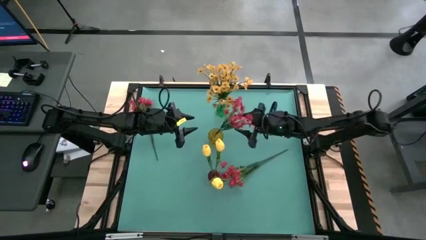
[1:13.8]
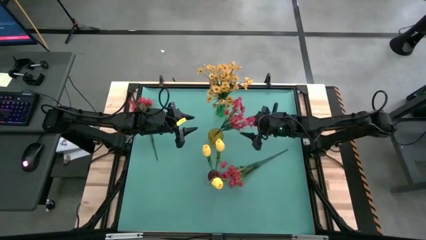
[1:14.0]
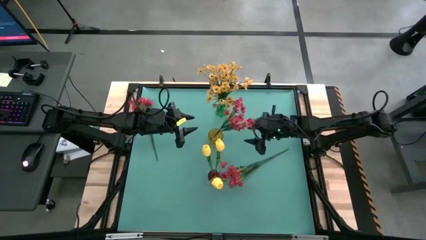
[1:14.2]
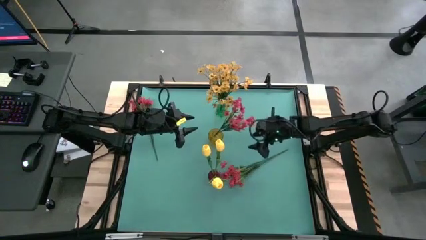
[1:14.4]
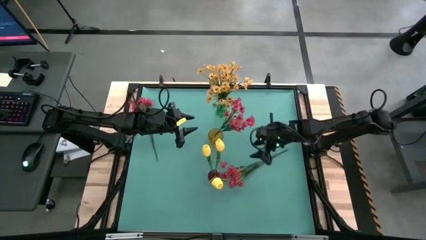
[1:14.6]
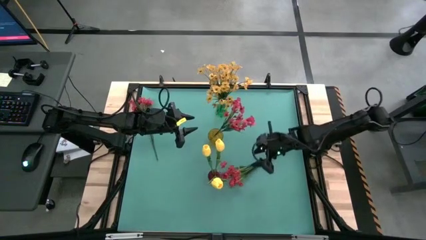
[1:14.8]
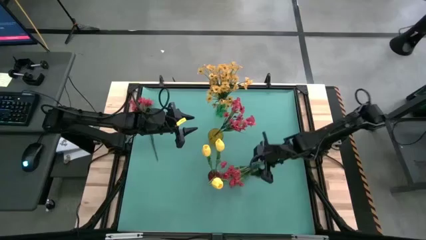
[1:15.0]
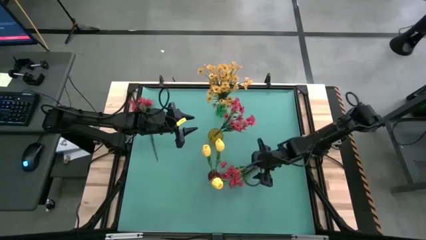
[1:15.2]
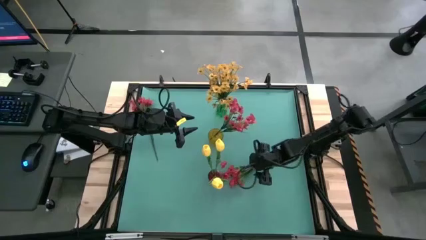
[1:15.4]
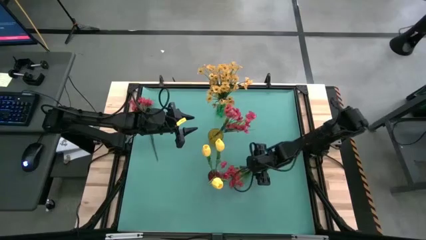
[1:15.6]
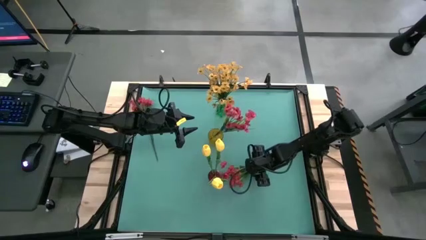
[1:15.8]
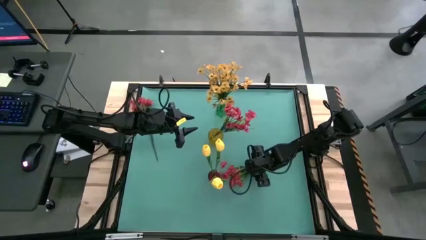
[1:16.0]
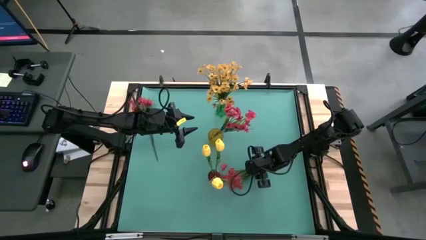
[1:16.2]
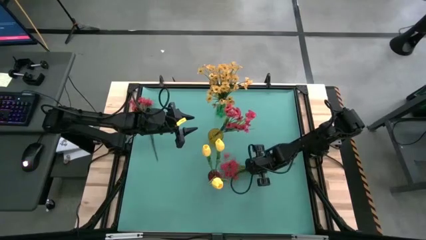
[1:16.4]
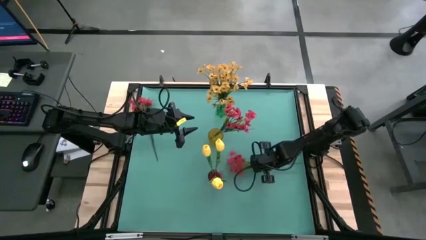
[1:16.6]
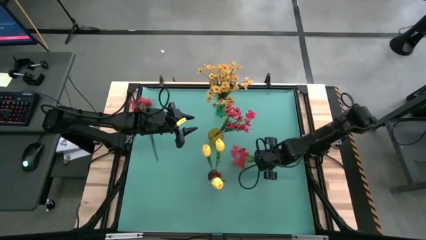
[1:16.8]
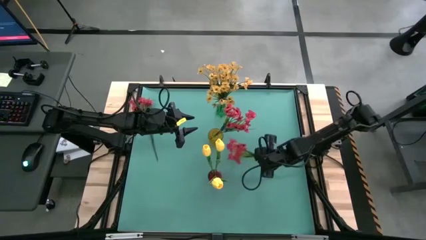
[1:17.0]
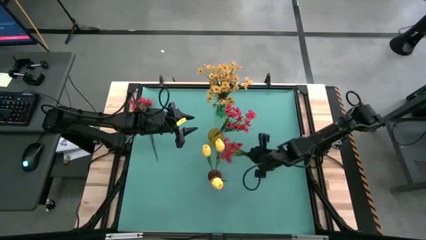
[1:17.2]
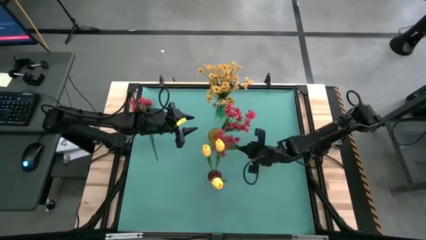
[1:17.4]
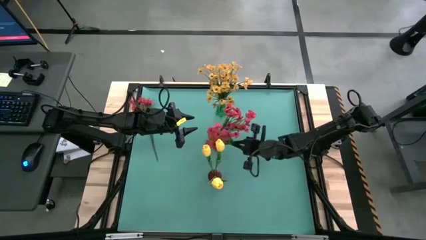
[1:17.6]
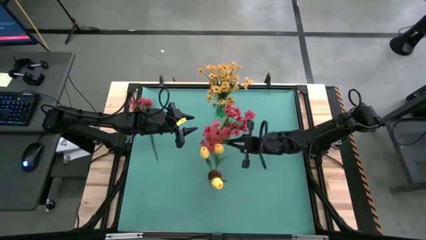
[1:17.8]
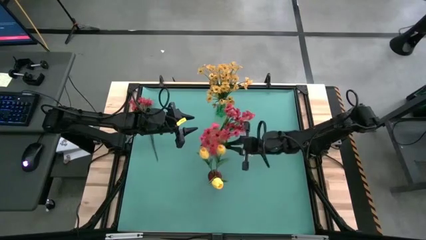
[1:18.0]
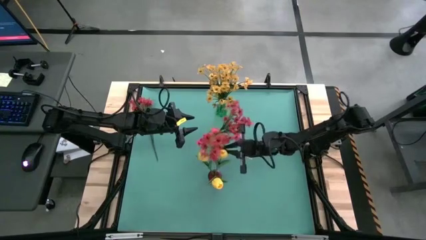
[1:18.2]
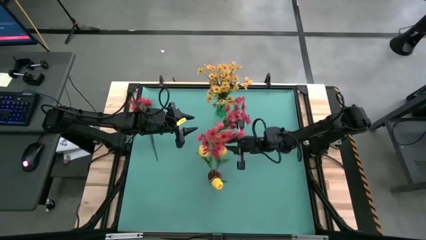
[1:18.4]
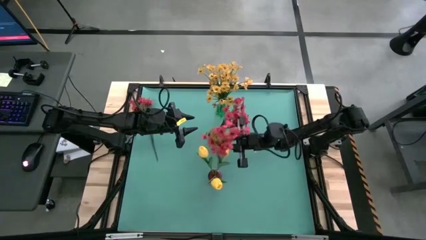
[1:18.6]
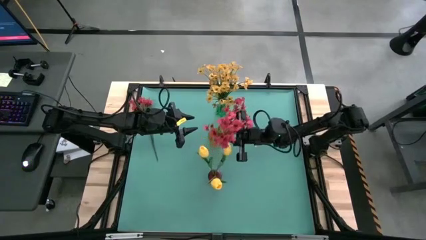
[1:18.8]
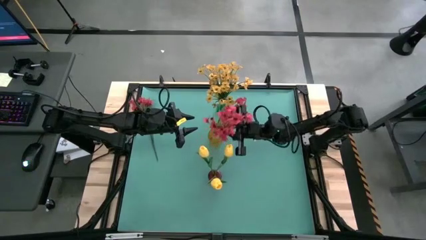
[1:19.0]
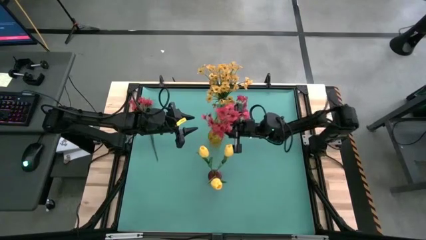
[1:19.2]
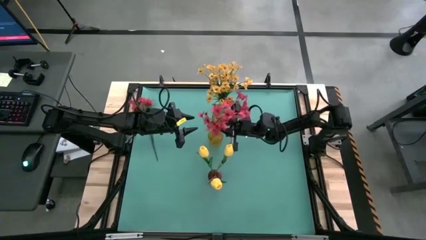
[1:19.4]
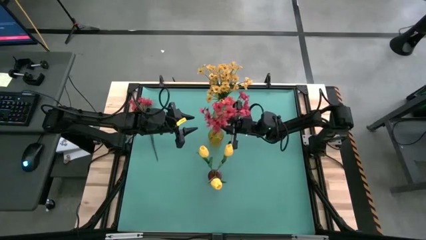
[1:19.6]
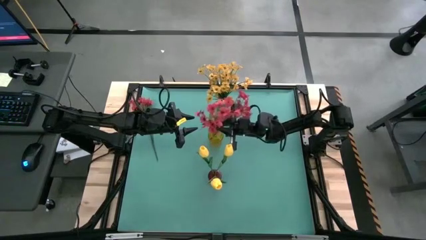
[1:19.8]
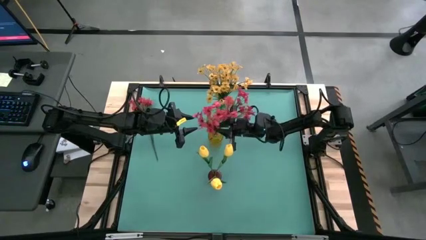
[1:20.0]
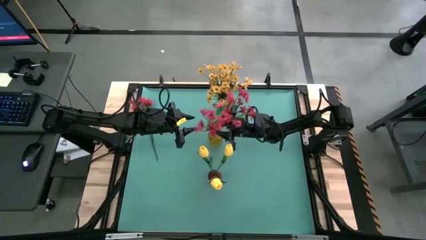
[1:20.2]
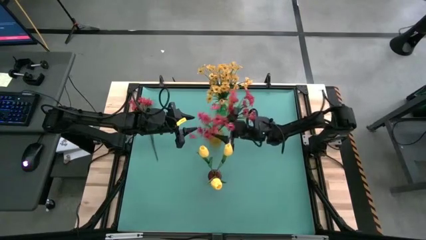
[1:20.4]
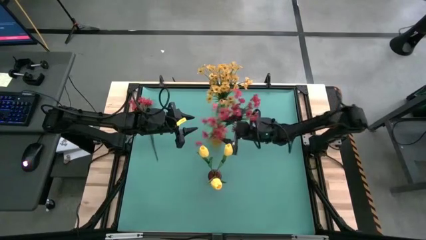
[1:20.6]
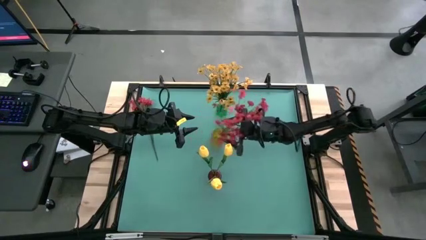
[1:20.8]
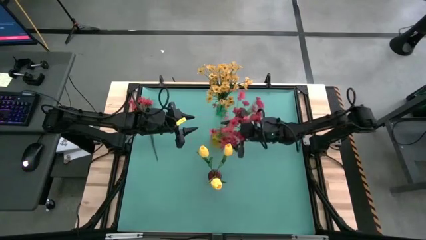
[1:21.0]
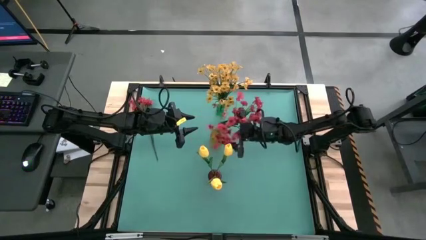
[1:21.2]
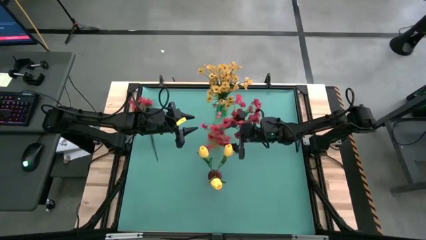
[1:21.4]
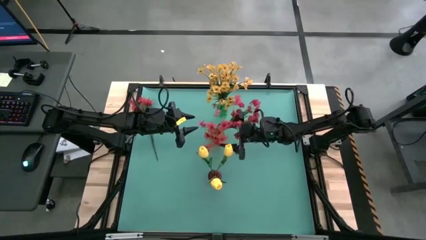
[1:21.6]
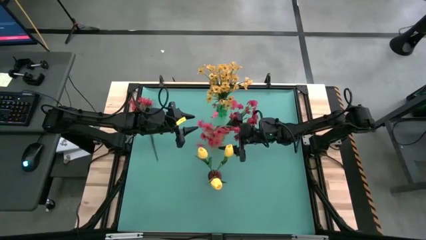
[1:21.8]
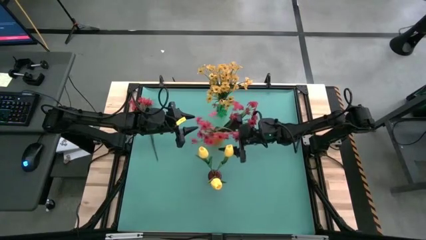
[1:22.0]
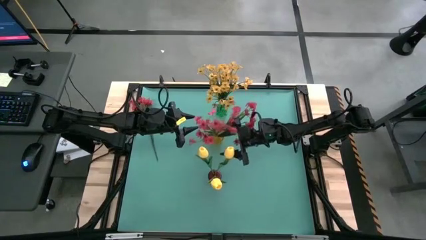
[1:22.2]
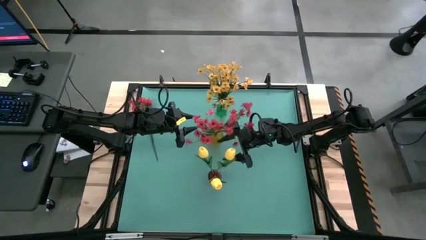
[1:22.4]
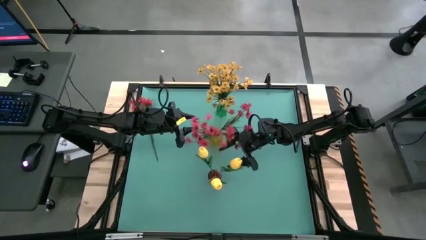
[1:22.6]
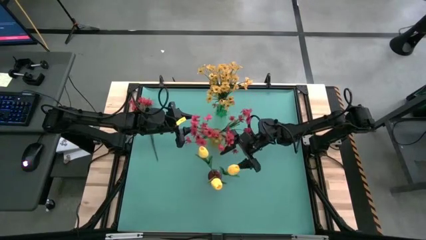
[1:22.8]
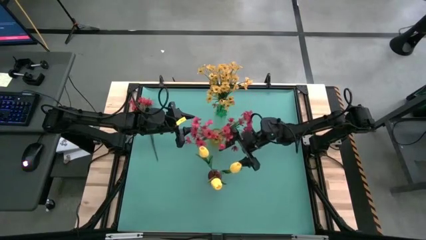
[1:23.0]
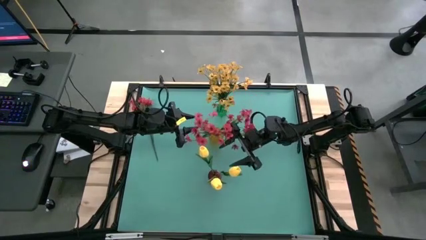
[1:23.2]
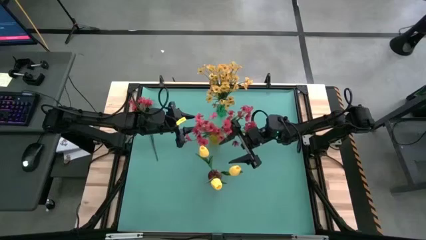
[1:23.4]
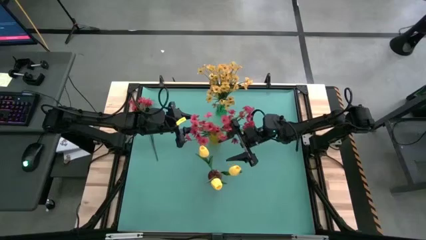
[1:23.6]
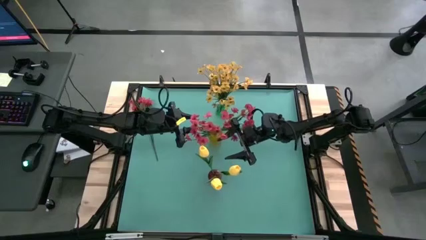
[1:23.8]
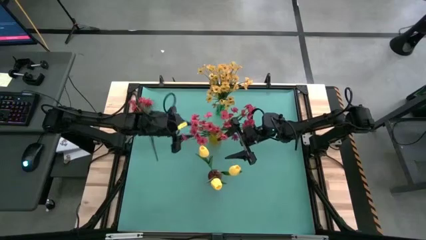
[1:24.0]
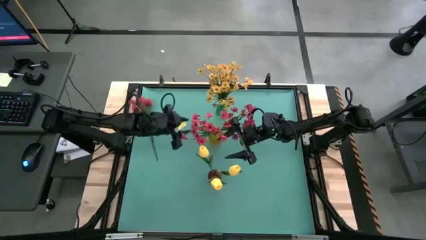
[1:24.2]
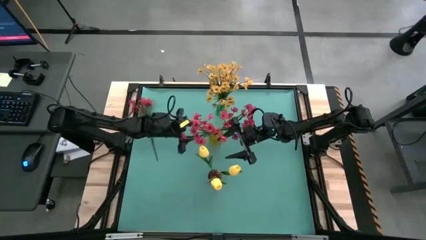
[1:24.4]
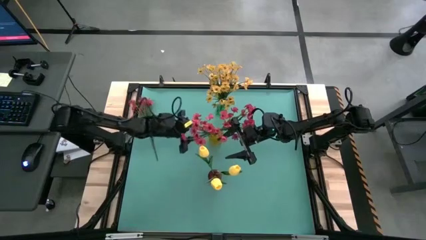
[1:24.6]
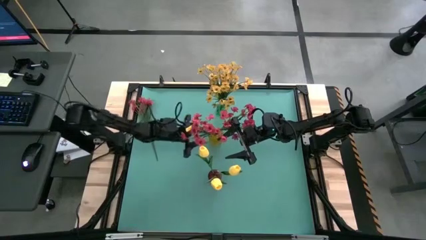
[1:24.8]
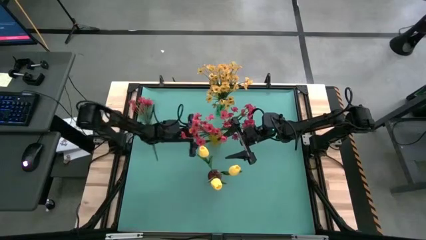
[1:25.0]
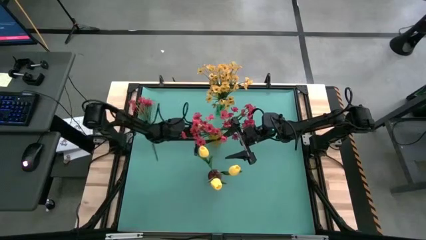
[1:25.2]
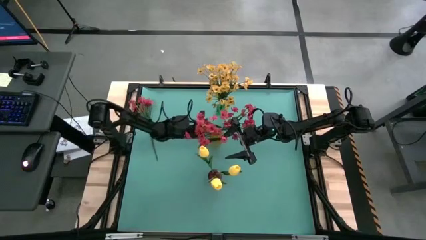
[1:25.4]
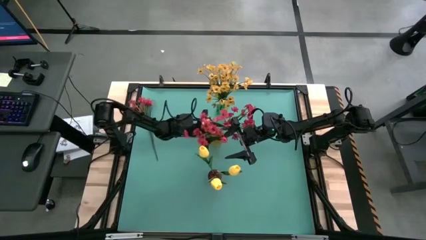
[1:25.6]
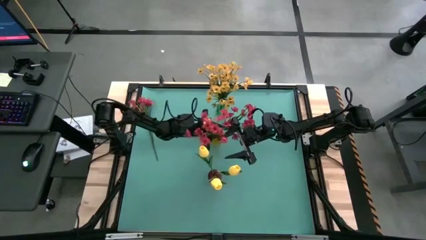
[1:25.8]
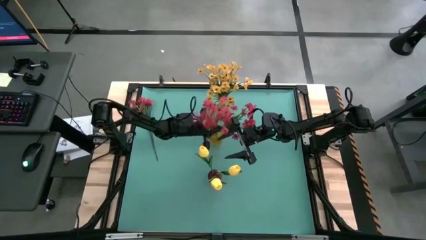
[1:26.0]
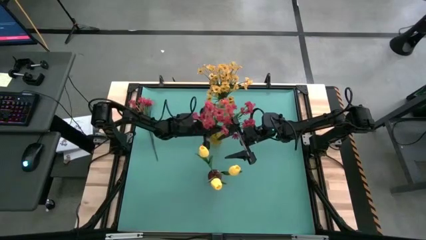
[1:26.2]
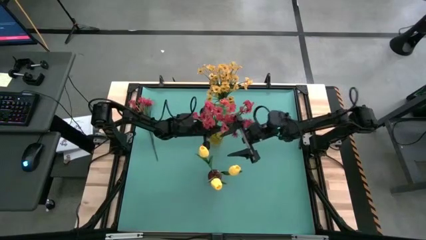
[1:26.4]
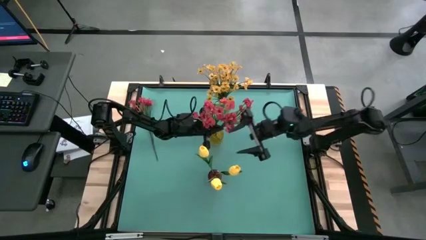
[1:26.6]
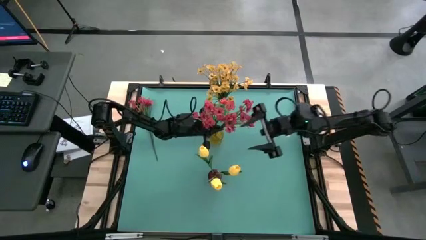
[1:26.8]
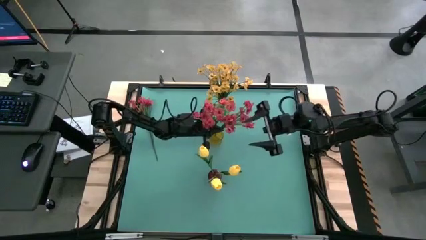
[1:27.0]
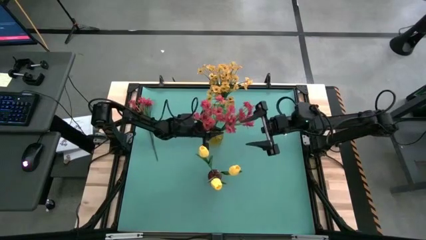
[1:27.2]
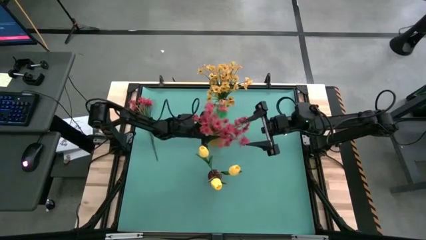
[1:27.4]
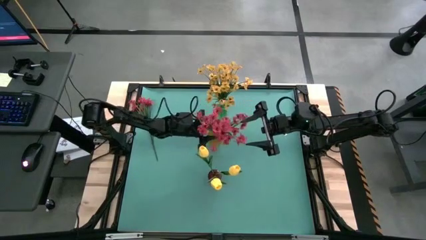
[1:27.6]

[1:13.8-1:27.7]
Task: Sort flowers into vase by color
Put the right red flowers into the yellow vase

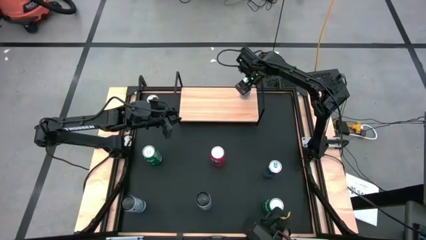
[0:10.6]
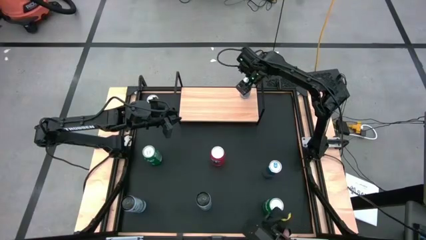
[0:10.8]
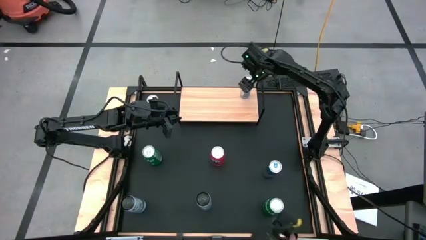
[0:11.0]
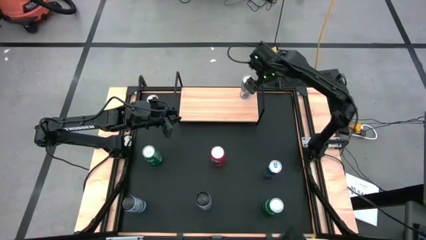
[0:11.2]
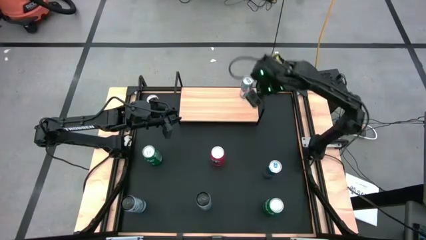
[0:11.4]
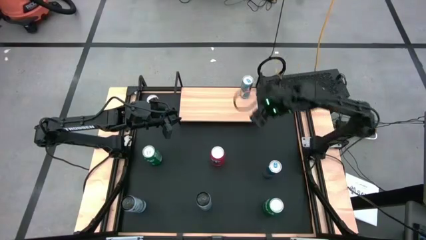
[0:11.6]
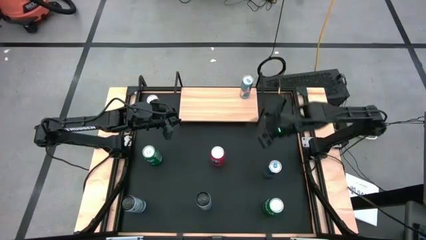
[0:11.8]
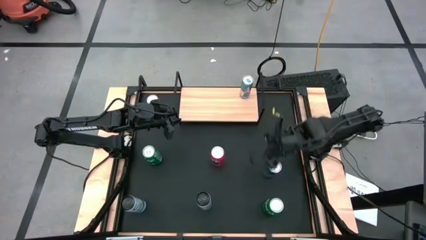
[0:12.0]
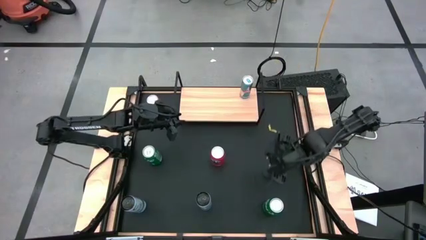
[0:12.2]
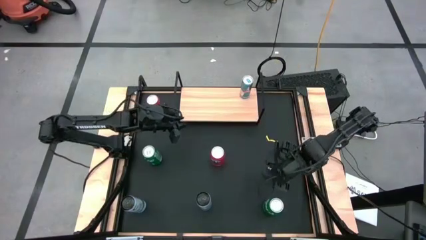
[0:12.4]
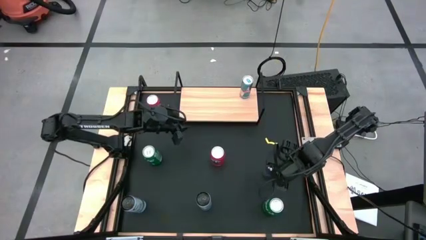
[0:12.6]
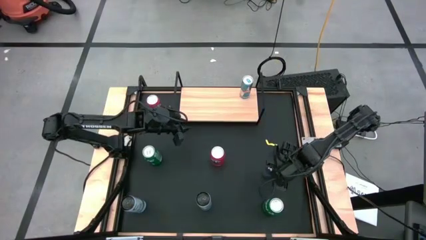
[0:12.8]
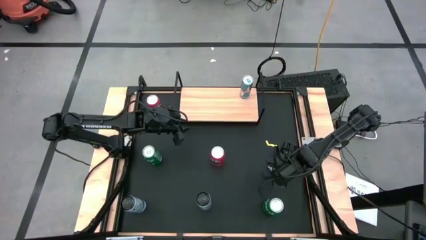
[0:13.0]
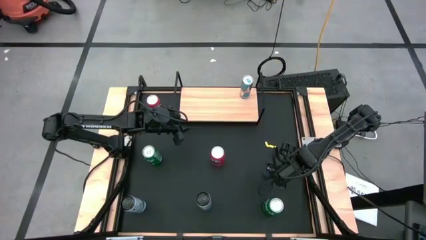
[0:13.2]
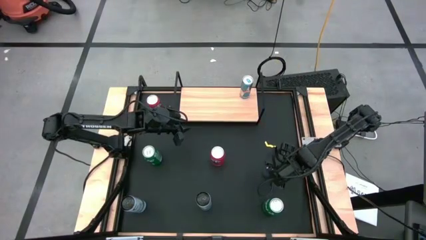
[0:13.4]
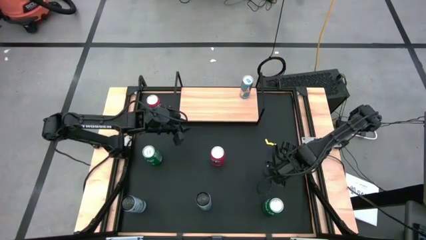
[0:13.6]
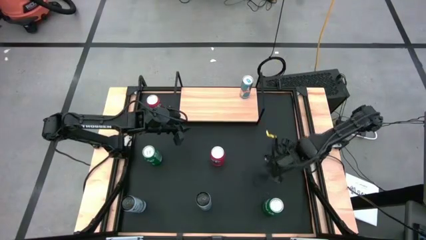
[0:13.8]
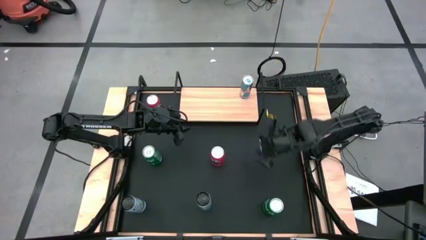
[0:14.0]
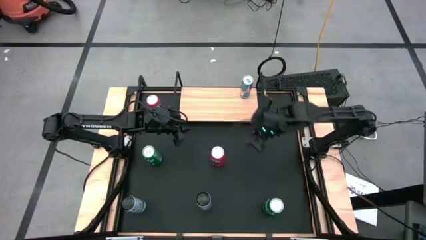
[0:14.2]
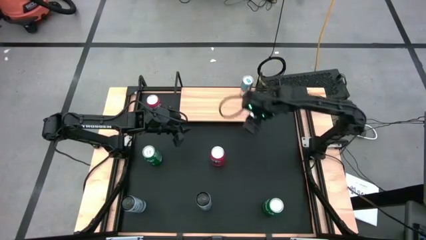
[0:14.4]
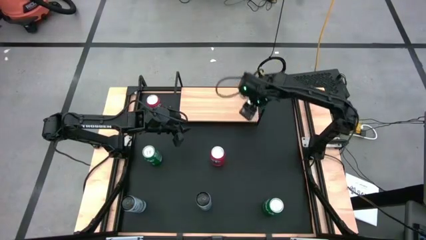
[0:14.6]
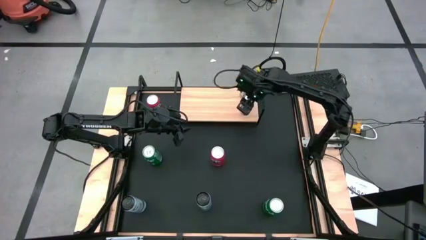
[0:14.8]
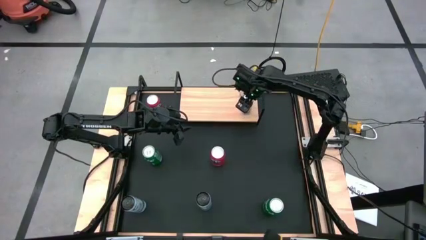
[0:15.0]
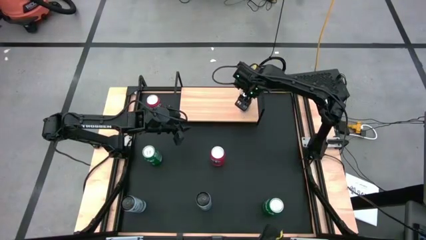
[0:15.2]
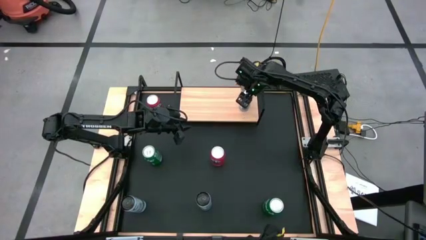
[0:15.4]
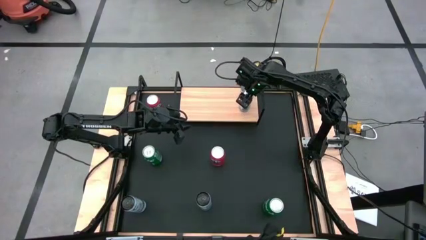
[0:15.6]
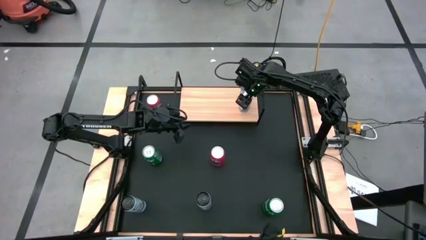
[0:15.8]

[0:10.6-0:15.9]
Task: Place canned beverage on shelf
Put the blue soda can on the shelf aligned with the other blue soda can
